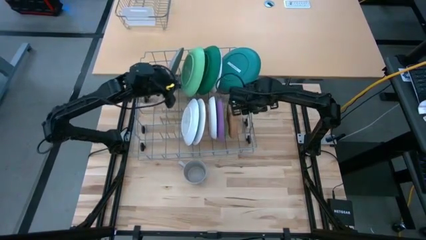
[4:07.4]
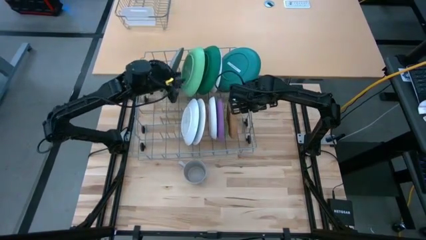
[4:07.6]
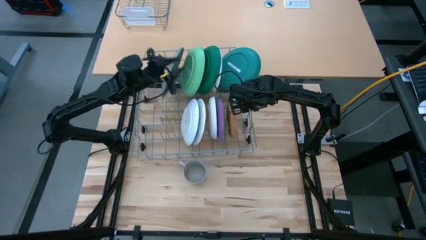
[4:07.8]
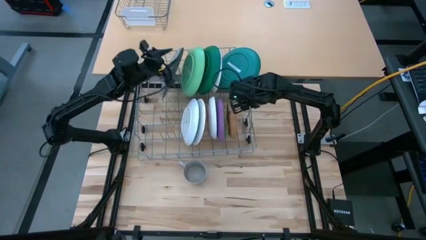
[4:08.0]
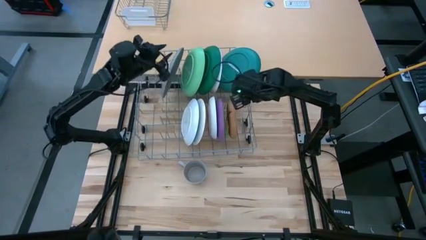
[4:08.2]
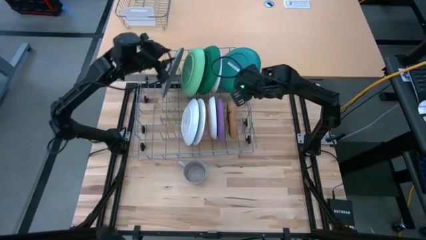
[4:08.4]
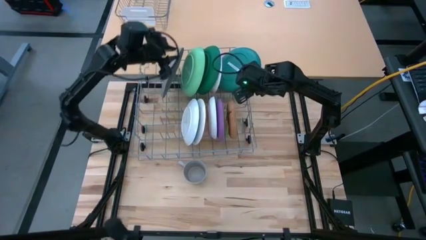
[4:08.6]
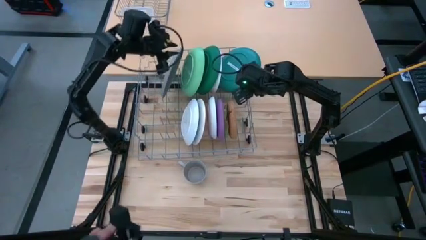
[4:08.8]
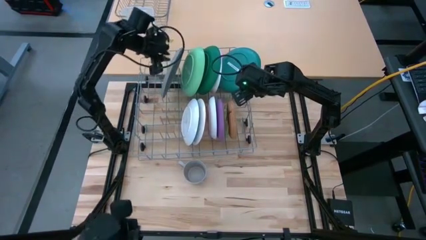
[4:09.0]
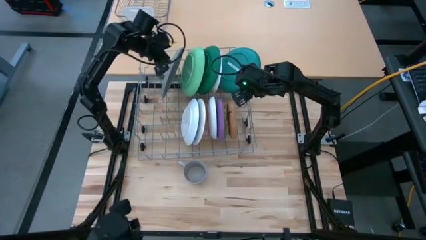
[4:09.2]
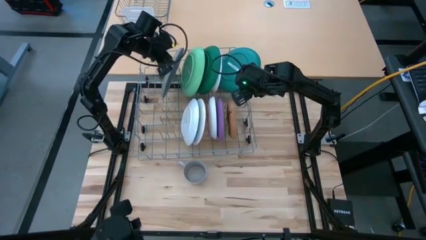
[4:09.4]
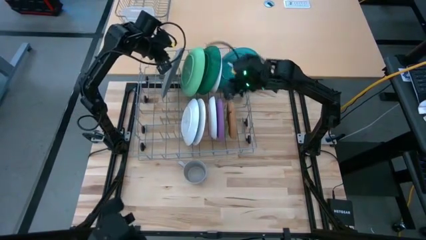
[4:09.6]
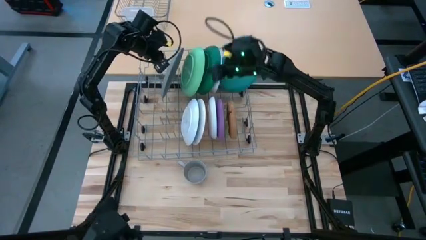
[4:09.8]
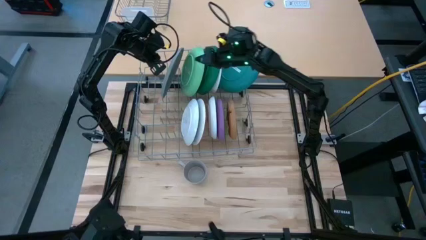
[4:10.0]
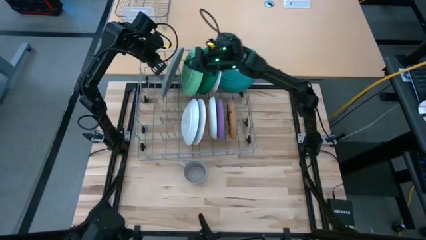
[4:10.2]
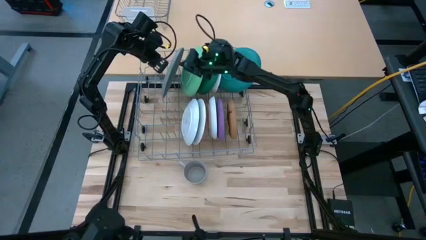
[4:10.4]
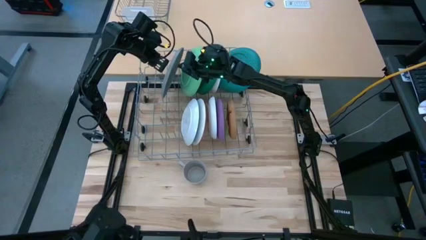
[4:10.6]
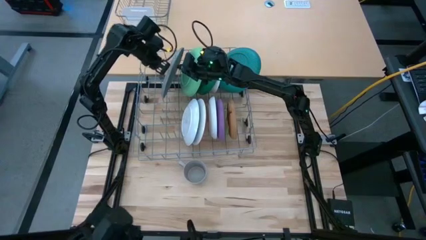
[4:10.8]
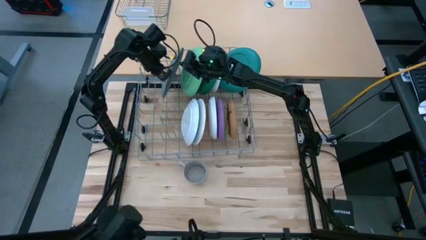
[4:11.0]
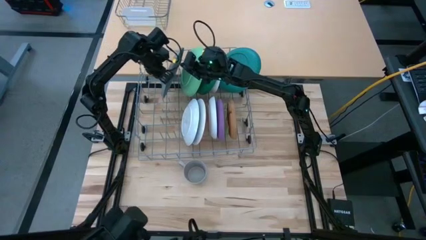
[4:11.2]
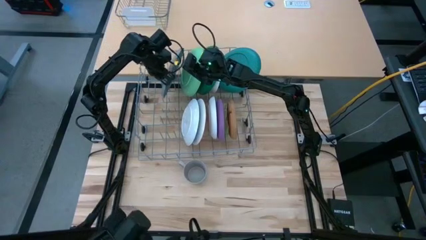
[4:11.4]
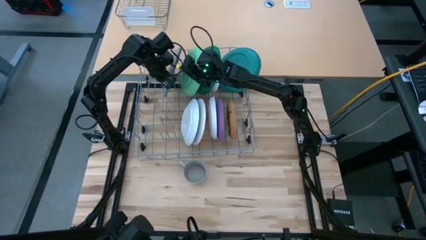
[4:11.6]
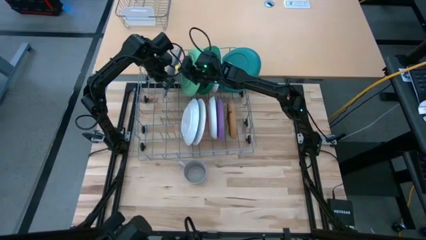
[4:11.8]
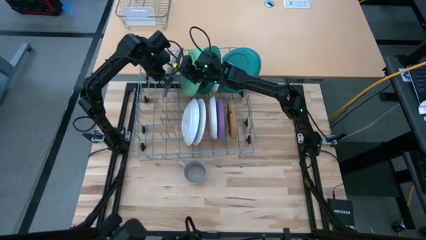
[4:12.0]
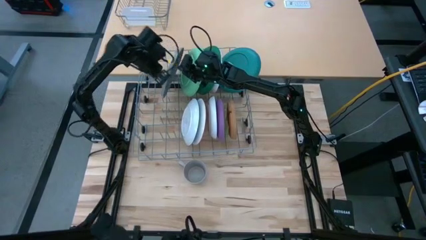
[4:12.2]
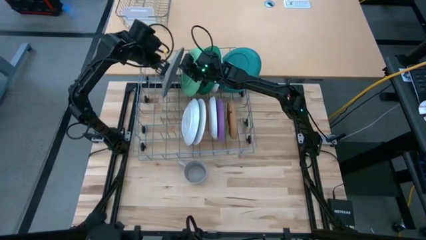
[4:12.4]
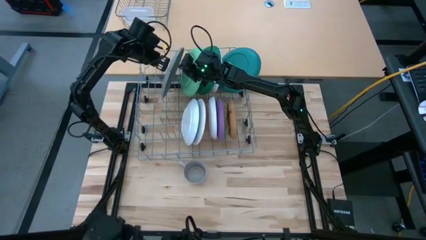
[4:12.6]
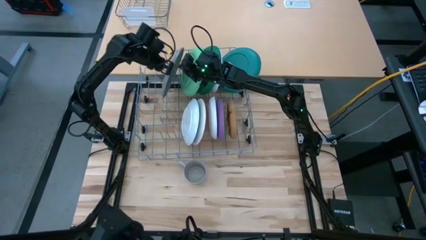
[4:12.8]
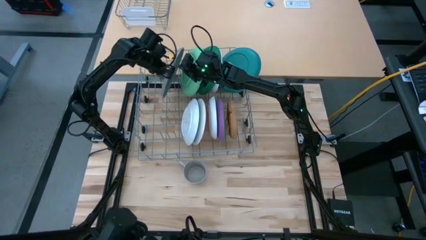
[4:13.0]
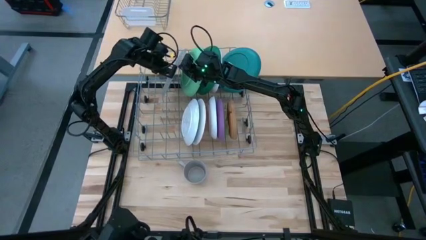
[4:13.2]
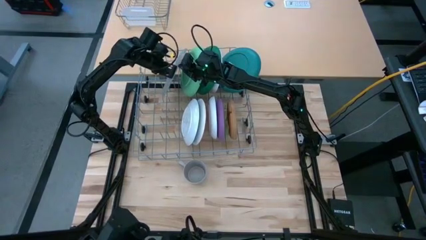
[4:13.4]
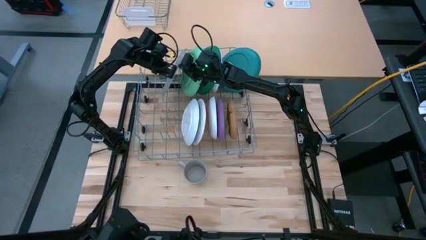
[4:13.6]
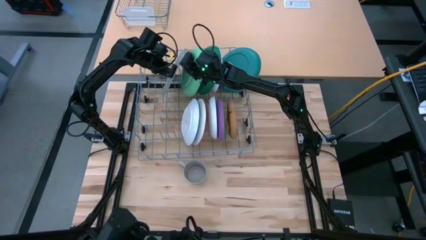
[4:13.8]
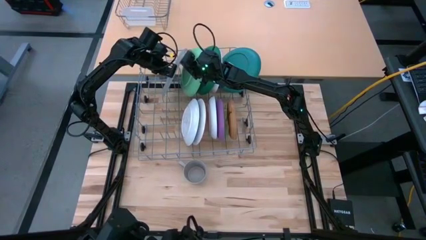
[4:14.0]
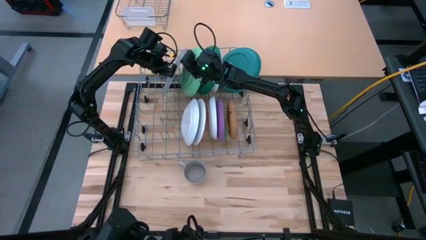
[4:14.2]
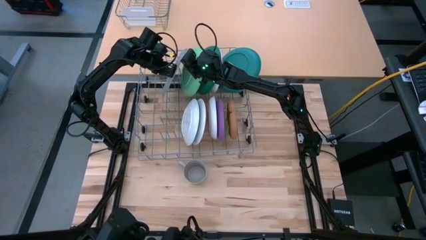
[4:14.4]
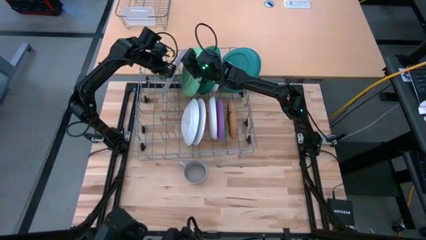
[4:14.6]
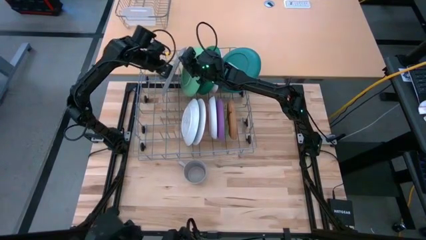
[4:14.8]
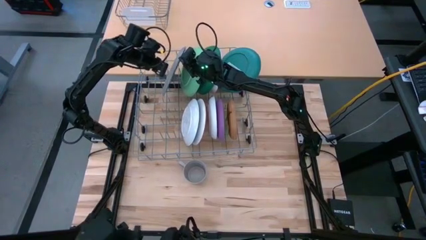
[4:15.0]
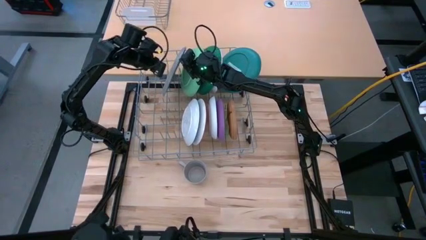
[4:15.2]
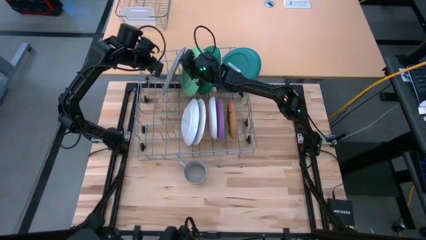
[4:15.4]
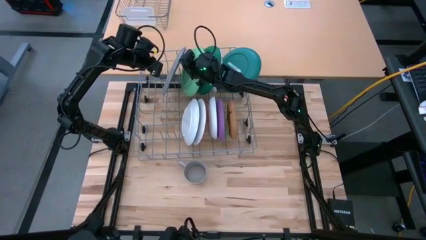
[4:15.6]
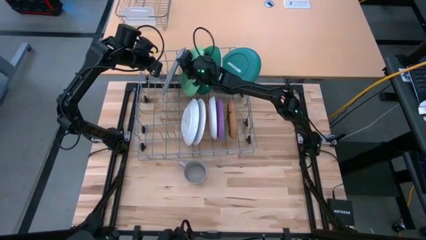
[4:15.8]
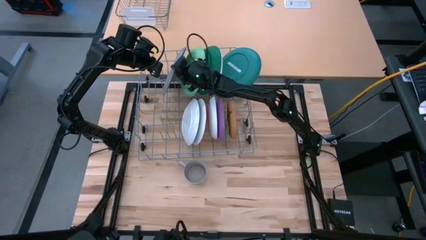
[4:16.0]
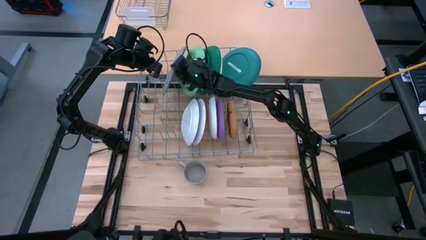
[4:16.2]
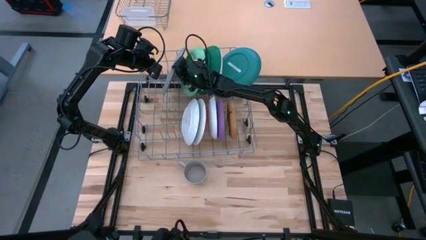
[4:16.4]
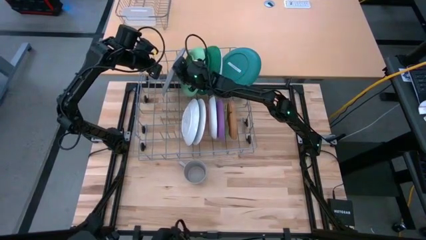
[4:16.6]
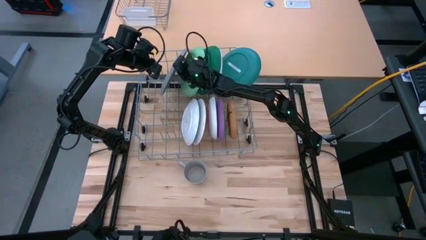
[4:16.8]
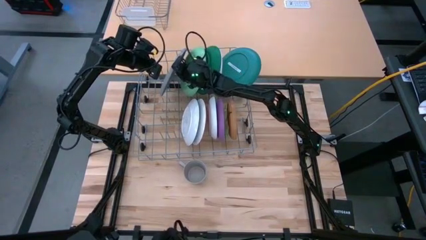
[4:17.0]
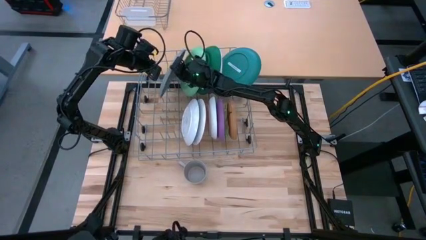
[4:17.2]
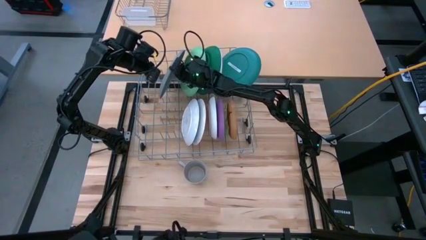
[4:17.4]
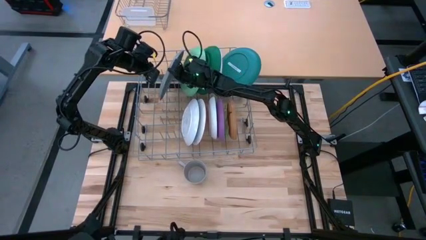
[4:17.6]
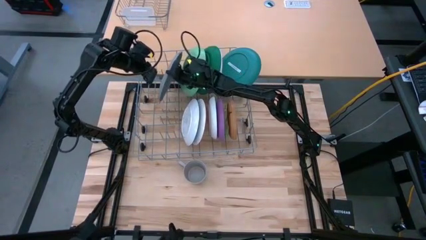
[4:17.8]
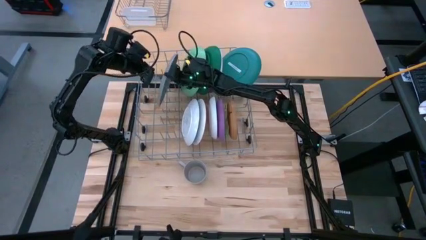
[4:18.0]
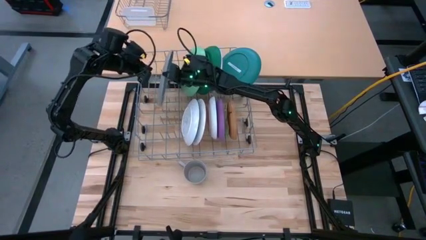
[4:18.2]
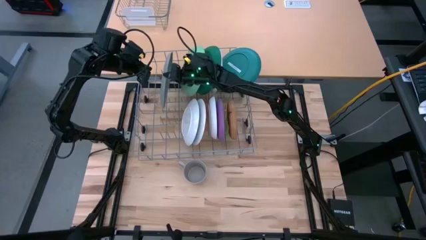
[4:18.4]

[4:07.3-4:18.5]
Task: Sort dishes
Adjust the gray plate

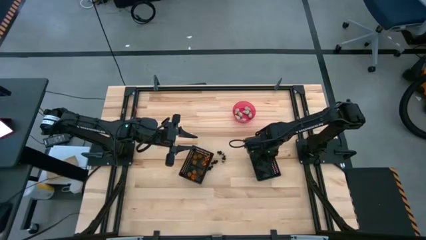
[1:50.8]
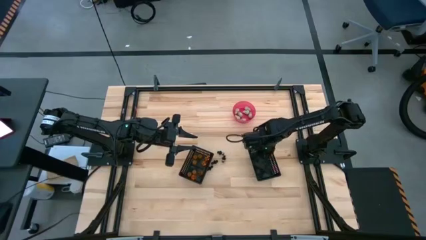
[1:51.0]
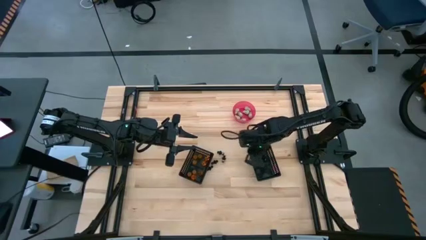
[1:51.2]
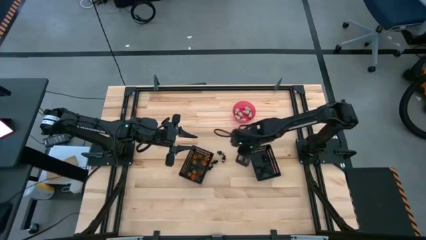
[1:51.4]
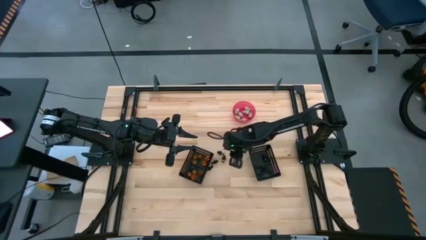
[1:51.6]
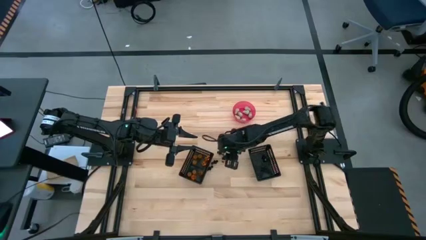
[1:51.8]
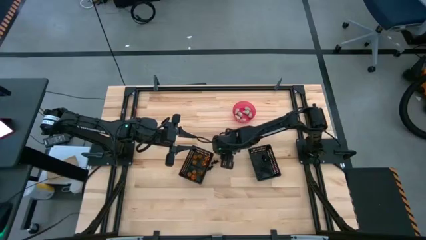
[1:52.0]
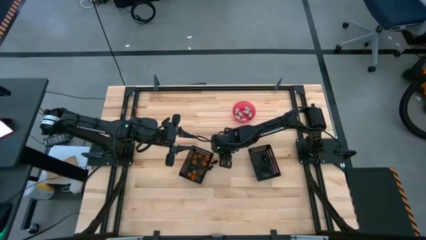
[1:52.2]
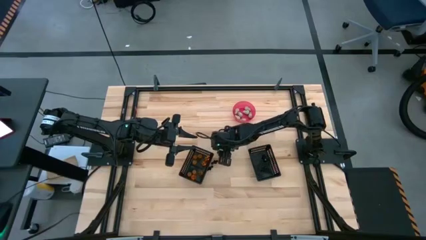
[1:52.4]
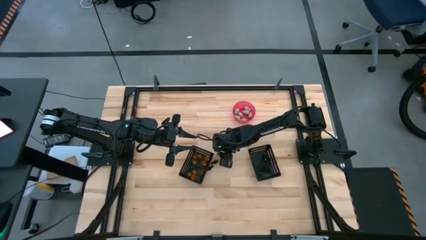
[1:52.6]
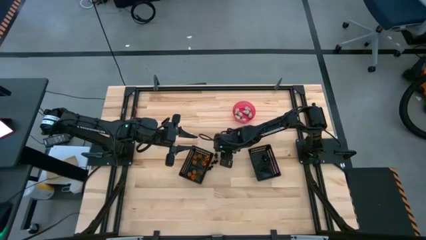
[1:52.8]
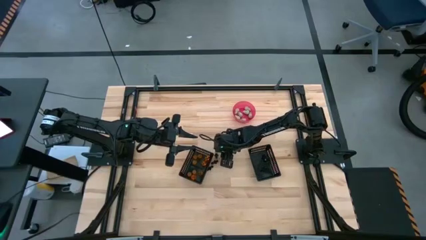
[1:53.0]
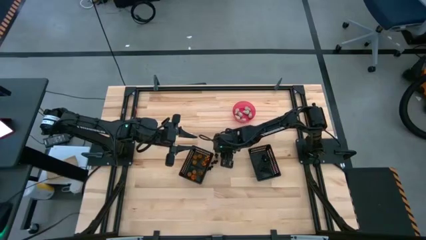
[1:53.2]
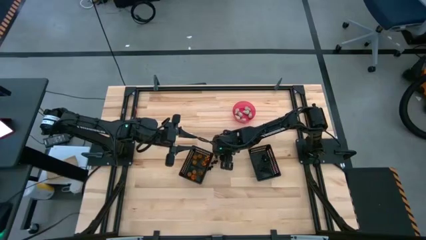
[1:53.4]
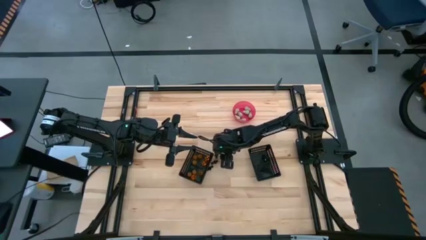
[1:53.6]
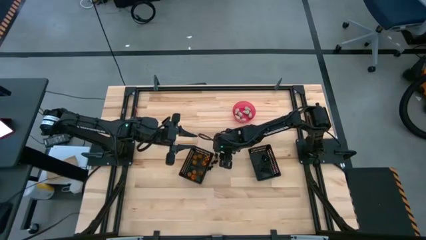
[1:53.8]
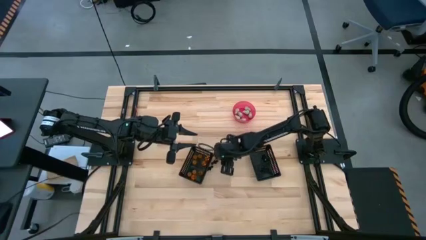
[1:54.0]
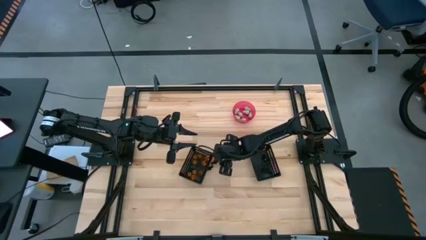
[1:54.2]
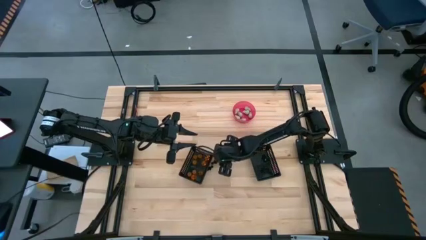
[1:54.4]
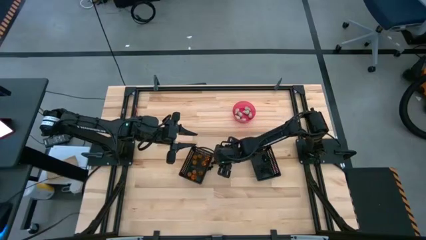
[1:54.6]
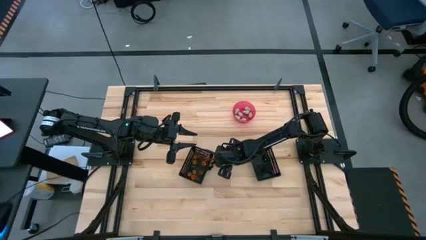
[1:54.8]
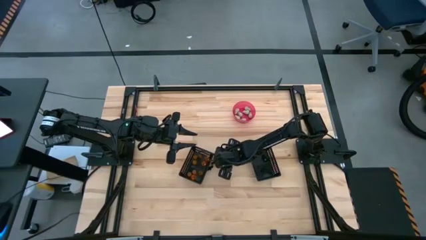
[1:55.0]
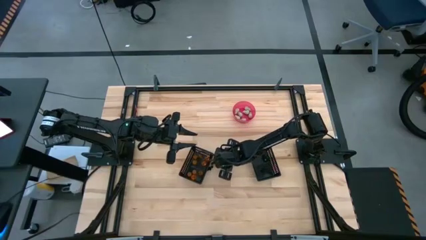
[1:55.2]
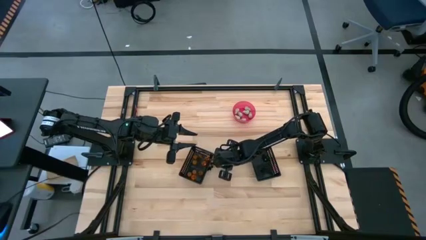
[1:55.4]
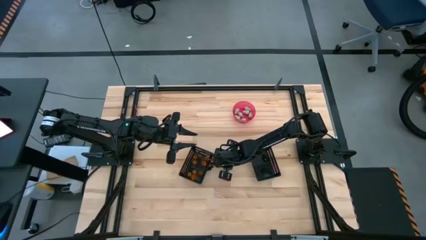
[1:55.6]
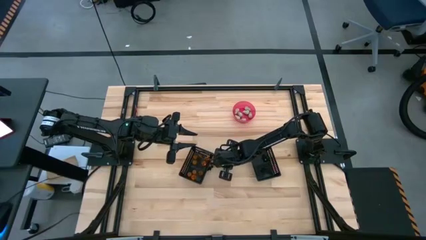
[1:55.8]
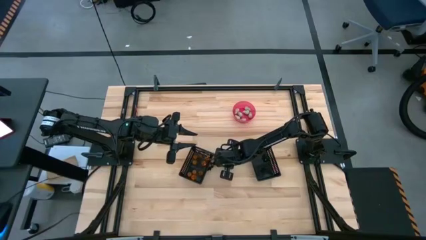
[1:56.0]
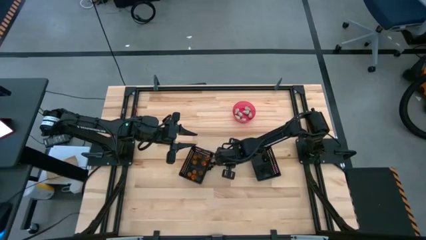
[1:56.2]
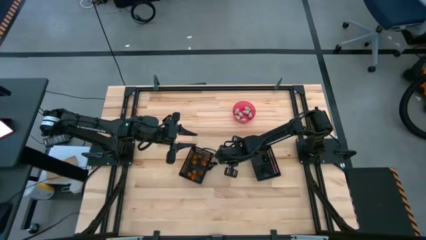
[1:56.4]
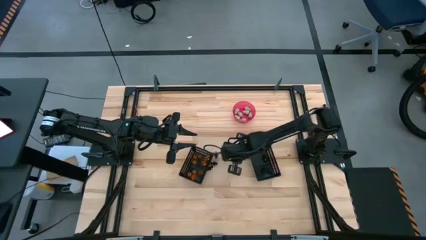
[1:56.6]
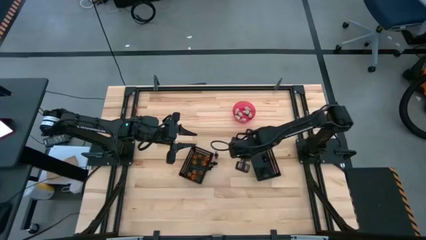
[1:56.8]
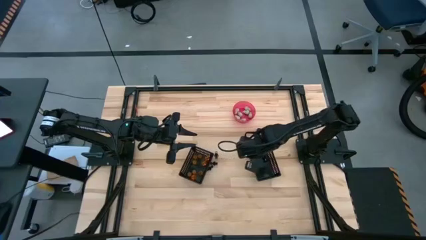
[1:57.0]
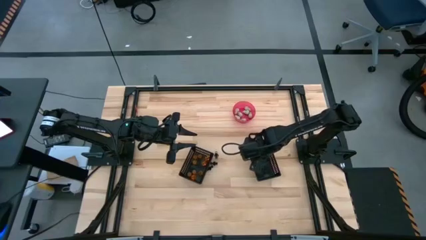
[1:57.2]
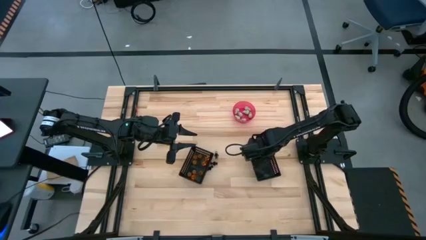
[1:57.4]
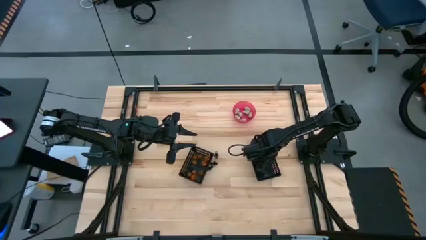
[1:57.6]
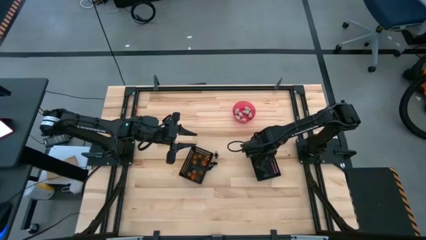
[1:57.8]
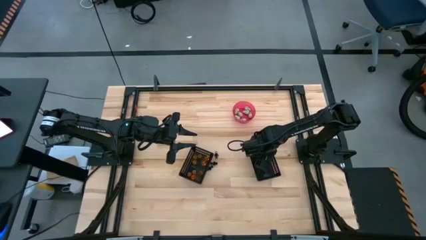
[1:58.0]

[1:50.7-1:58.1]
Task: Sort Halloween decoration
Put the black skeleton toy into the right black bin
